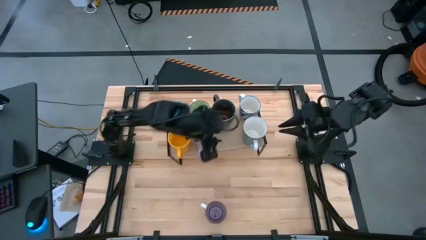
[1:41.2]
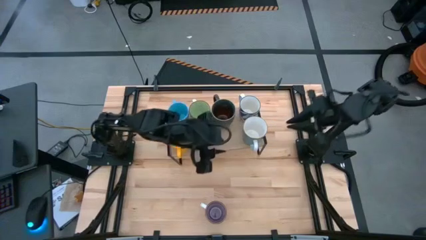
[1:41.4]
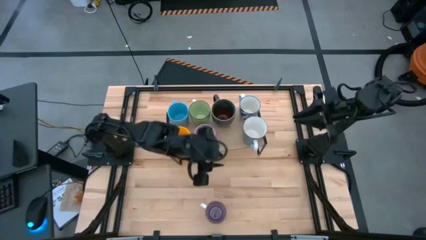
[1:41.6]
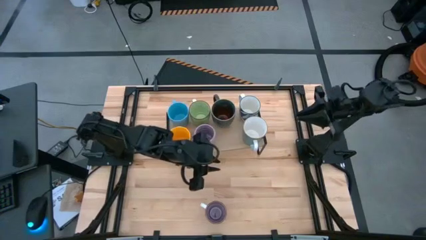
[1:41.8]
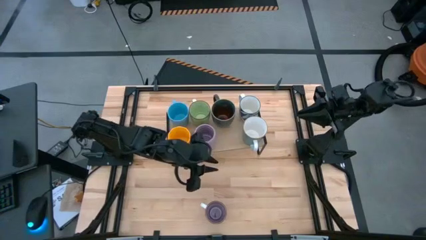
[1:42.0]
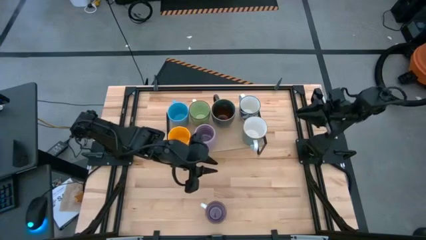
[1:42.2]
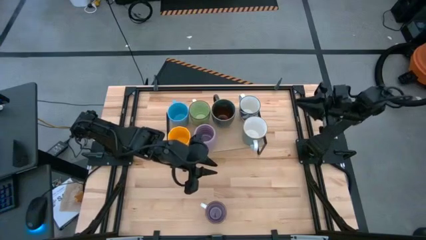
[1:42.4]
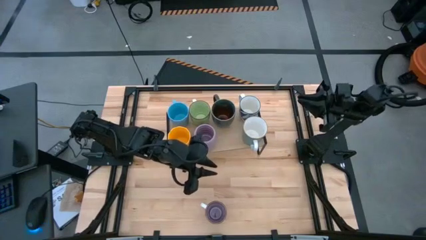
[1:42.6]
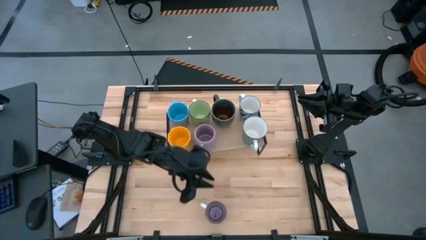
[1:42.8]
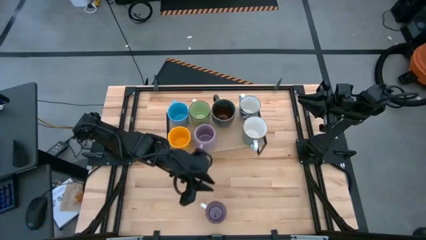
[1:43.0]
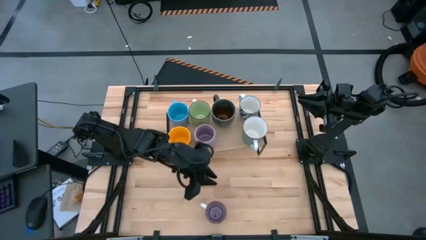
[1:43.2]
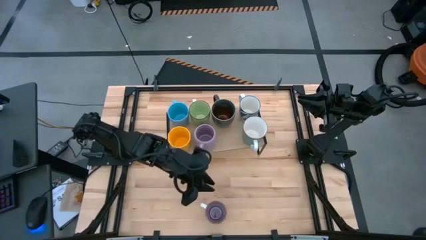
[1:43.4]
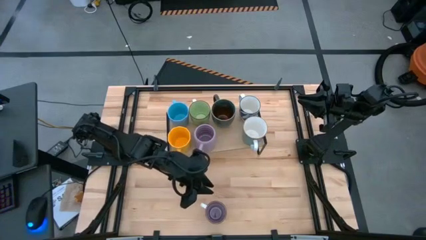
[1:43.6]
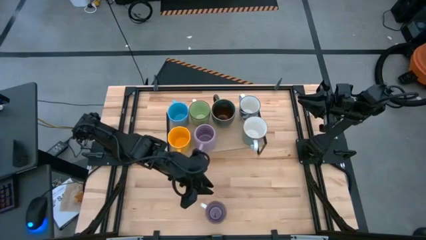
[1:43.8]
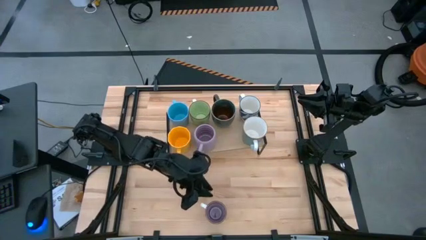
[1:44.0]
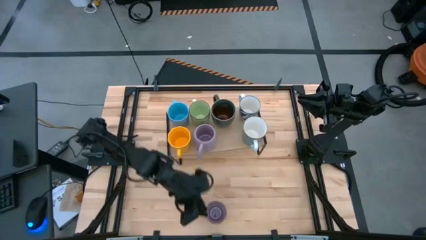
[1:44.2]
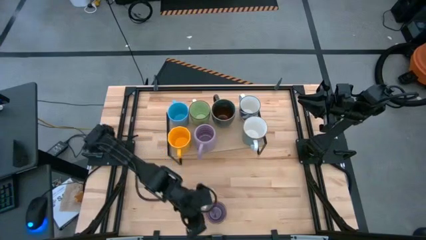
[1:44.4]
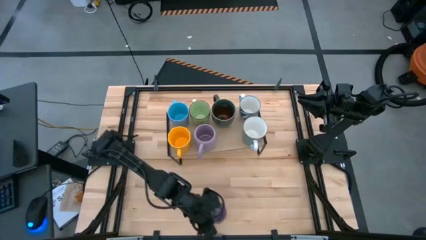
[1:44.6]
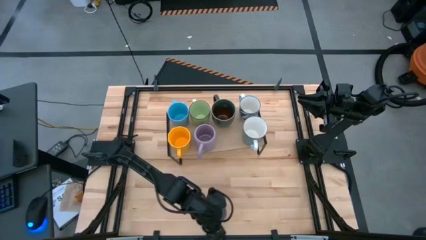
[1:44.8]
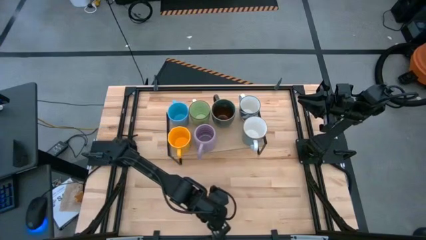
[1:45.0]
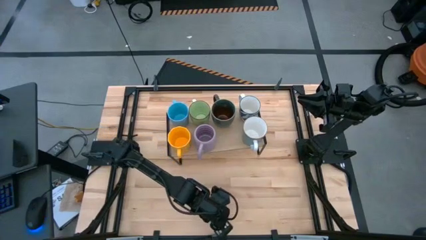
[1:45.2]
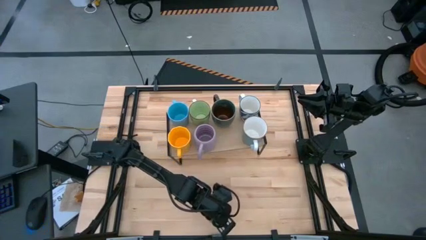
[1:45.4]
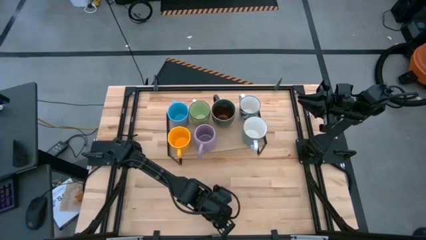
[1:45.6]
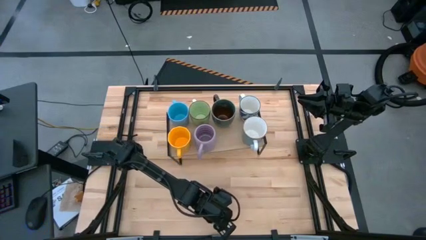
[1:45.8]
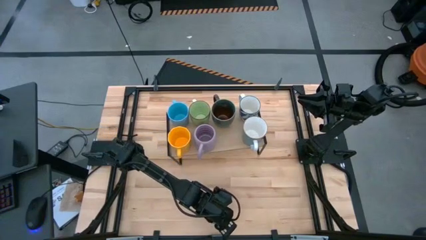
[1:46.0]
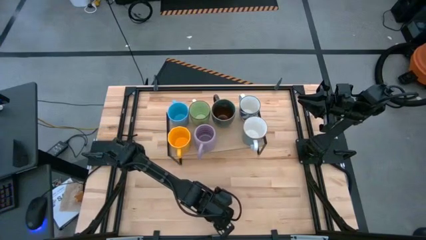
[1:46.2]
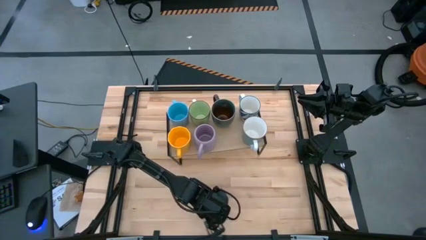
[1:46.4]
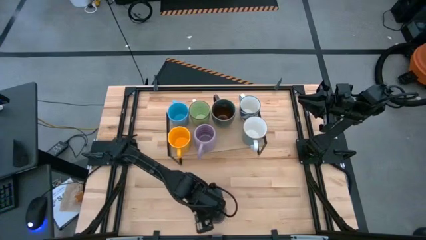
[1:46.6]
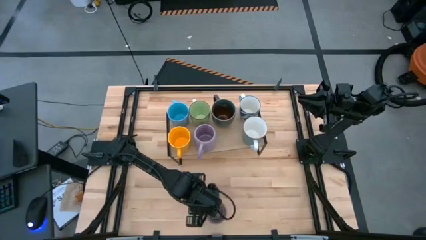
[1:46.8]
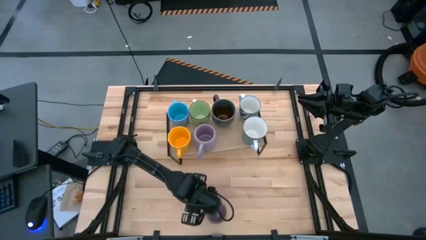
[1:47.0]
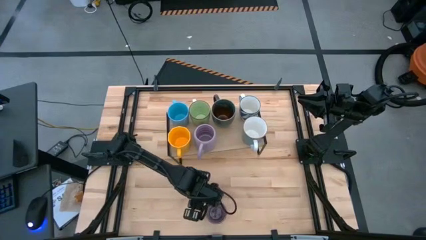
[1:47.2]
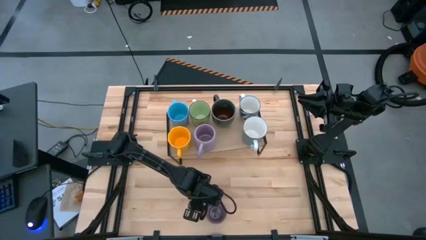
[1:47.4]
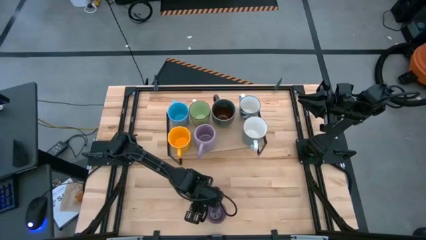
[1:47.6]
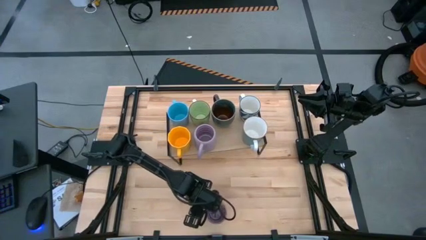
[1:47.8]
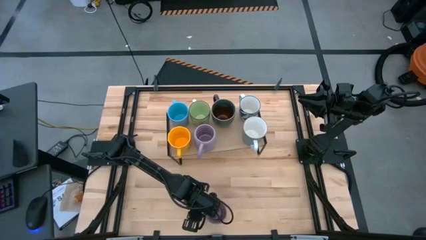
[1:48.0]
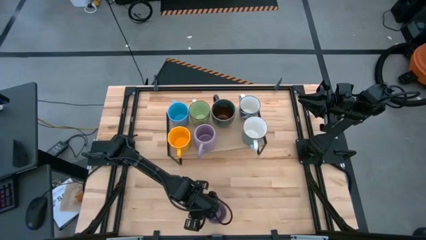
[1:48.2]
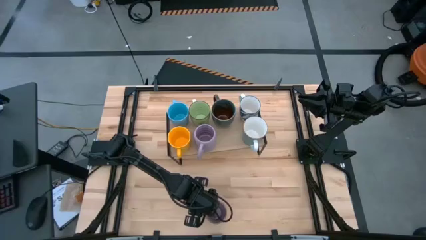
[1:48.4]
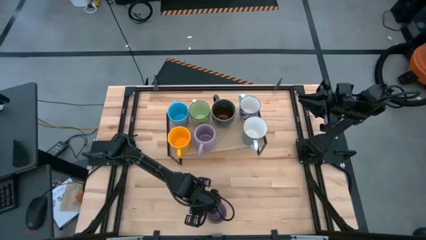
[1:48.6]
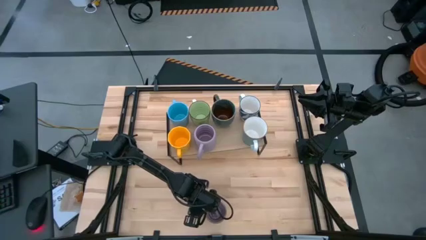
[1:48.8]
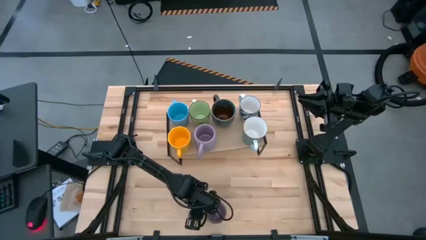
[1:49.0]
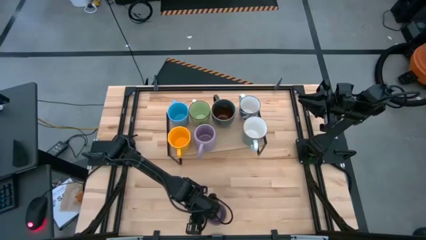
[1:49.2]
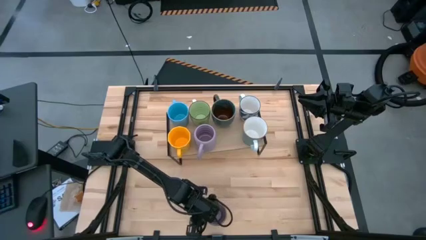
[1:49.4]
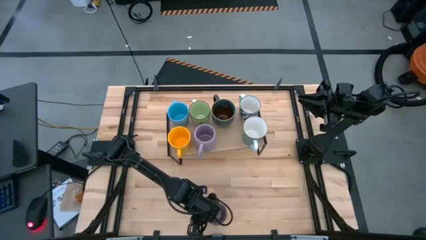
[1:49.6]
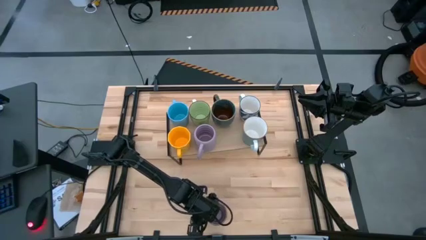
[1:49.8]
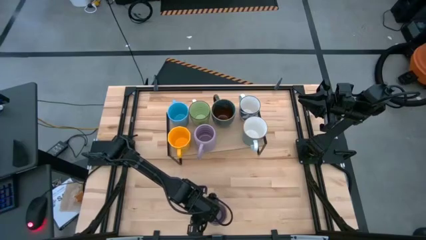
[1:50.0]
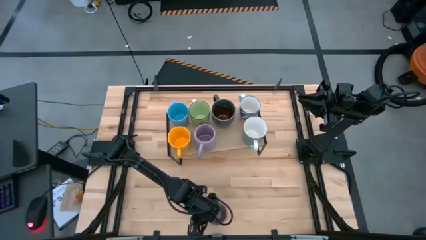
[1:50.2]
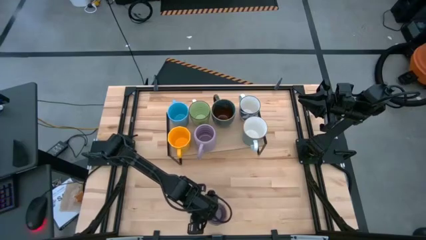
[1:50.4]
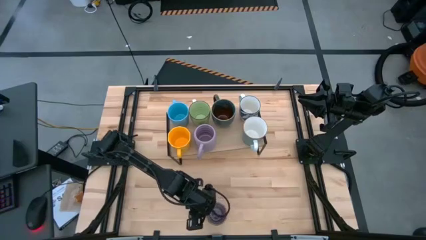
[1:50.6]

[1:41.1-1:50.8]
Task: Place coffee mugs
Put the right purple white mug on the shelf

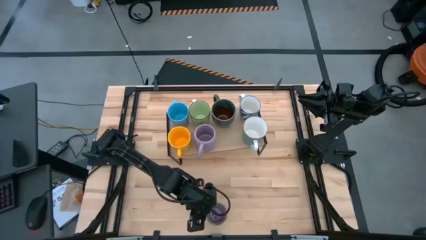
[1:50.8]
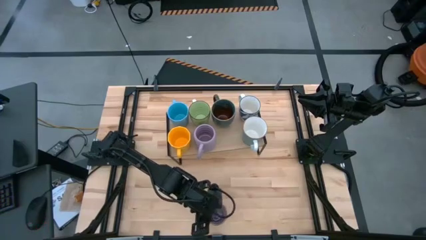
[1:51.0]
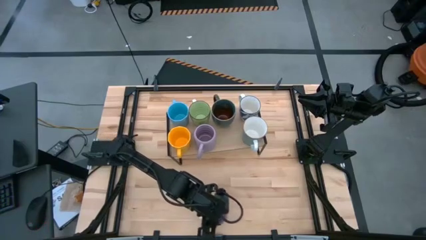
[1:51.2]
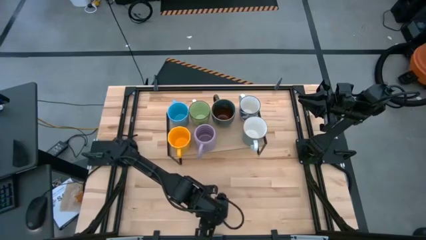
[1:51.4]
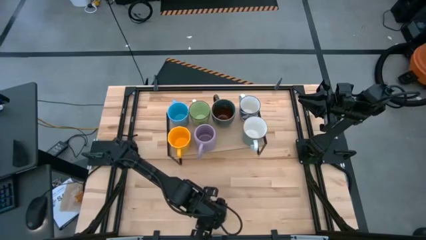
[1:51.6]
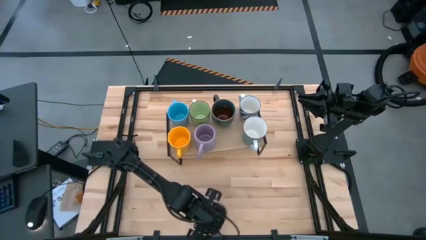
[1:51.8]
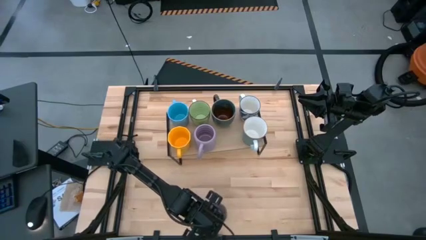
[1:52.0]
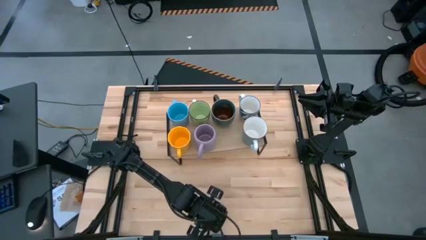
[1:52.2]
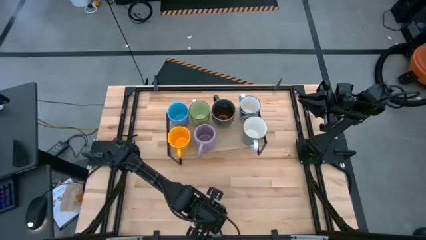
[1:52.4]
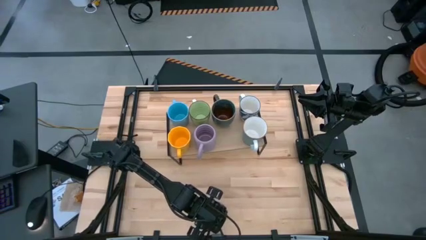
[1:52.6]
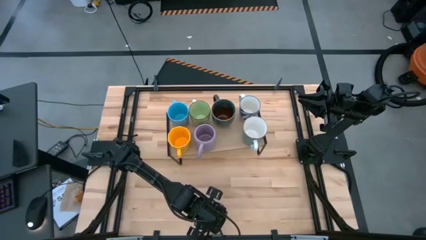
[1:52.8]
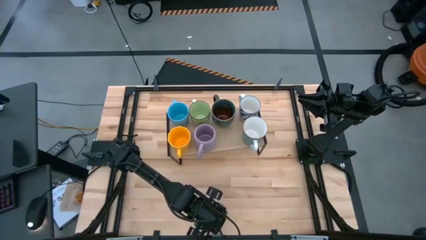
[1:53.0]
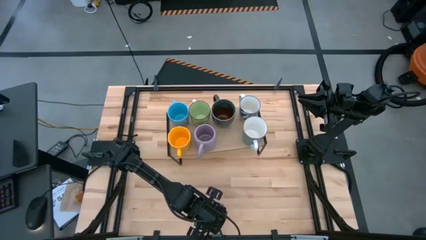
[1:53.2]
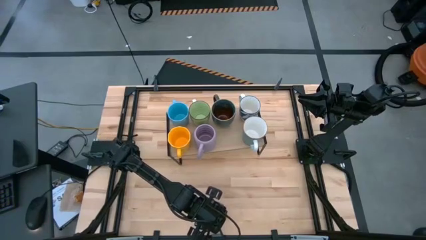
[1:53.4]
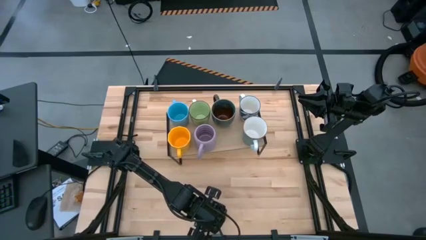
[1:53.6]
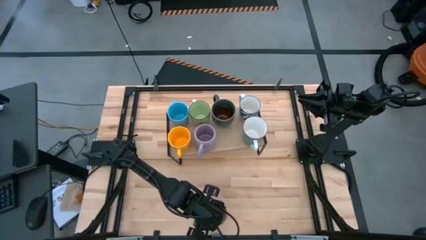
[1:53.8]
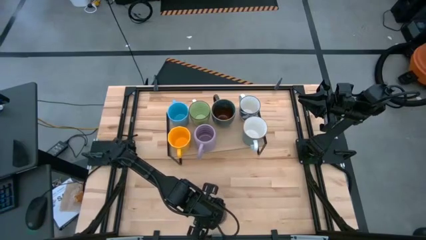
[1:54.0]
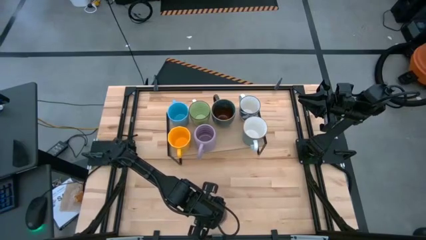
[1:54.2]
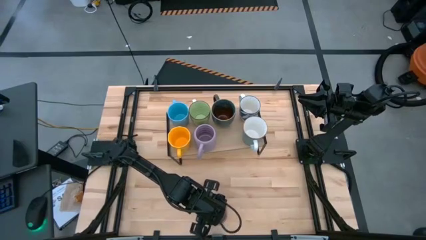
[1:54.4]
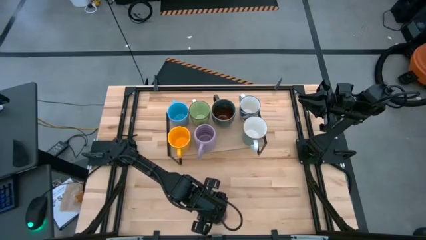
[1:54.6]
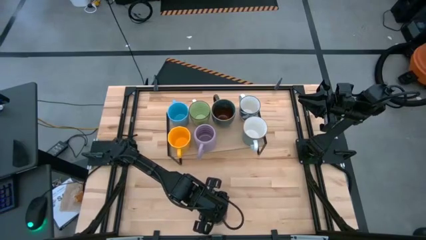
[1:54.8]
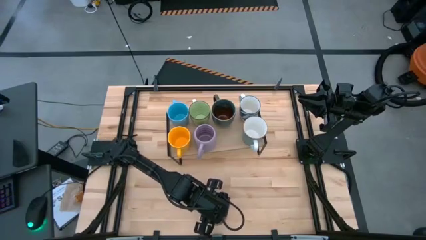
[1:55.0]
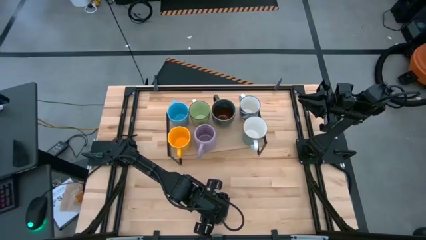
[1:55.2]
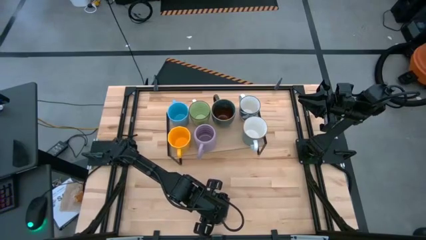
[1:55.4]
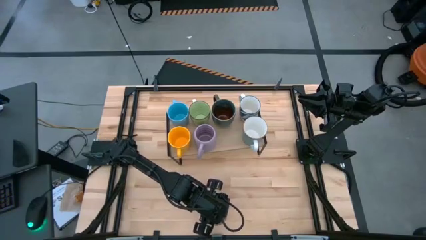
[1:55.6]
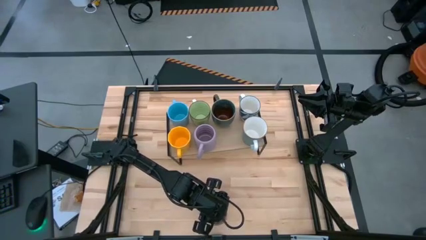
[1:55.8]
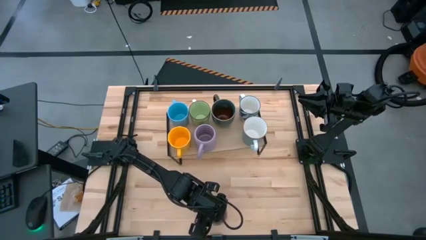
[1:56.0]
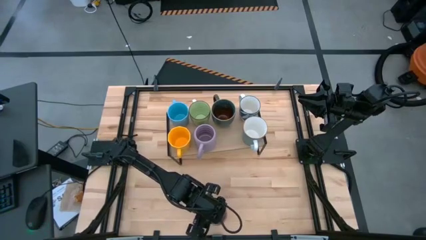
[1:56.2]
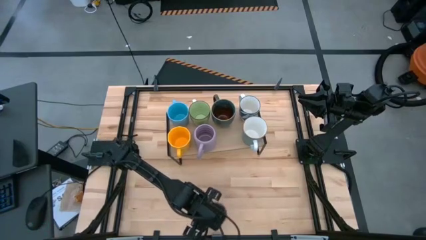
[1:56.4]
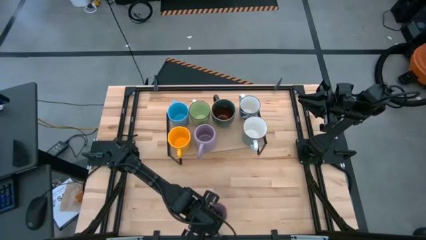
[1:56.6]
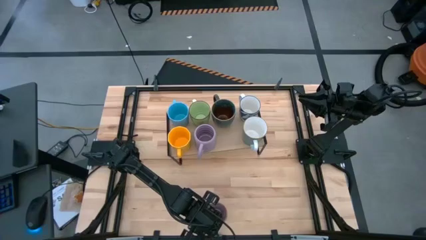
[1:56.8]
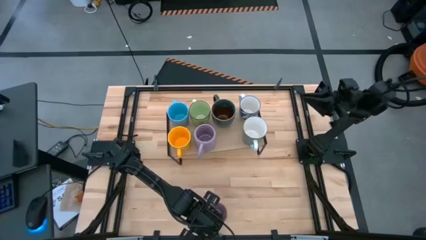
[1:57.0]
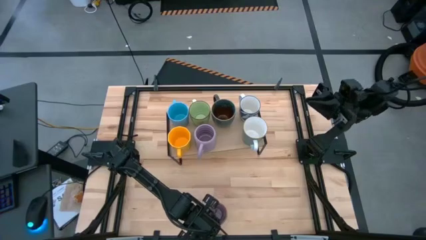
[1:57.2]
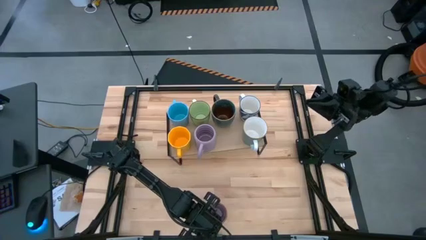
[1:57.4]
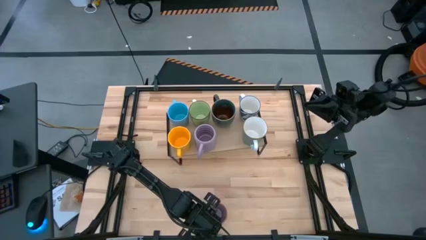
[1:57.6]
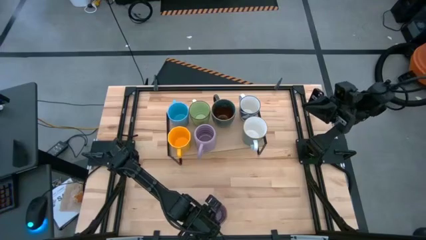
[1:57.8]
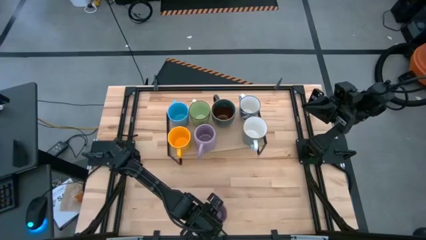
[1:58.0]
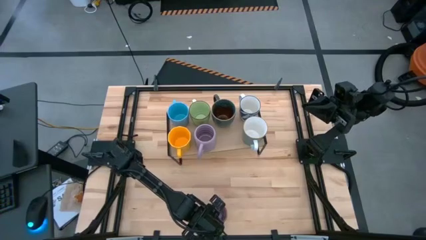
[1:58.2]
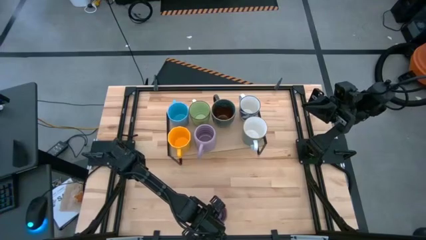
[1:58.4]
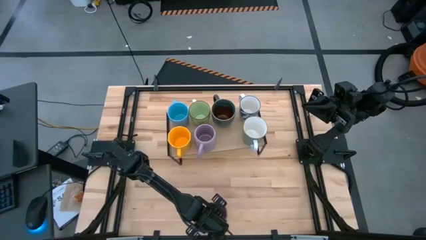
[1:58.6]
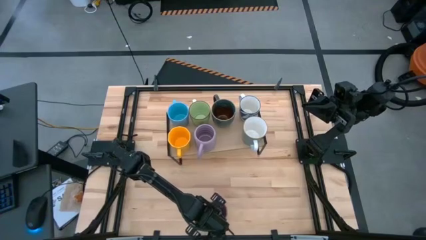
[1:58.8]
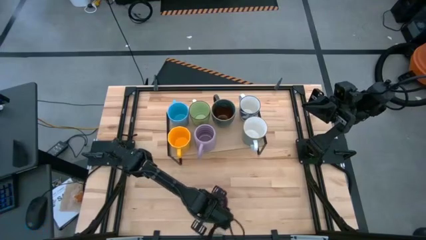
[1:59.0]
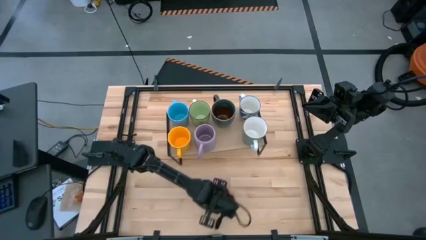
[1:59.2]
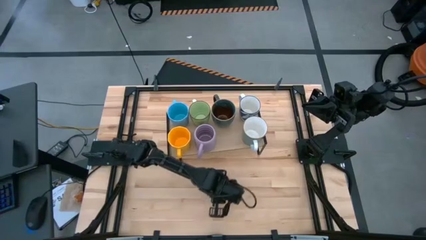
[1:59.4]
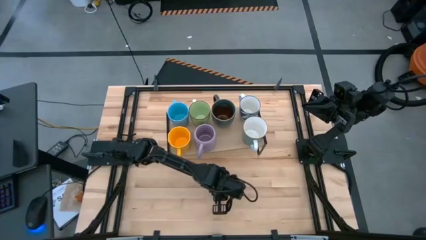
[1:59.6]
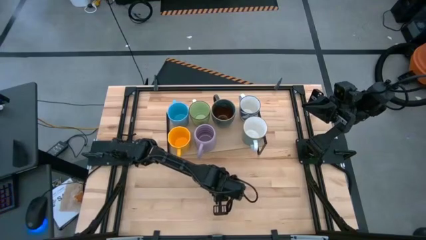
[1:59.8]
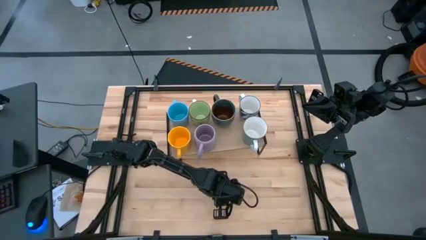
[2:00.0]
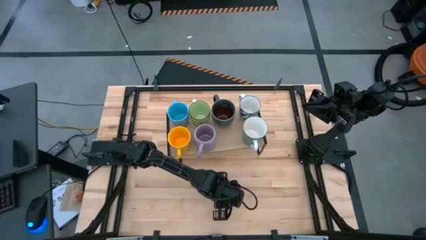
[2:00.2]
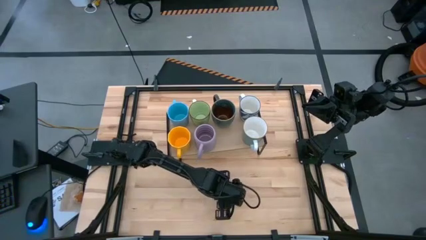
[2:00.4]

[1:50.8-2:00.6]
Put the right purple white mug on the shelf
